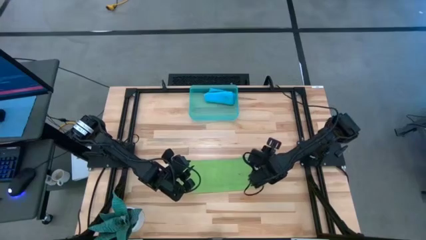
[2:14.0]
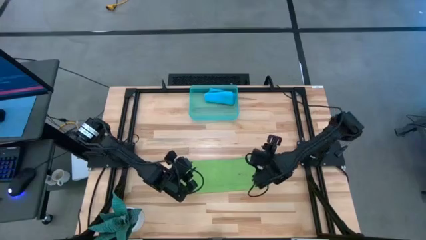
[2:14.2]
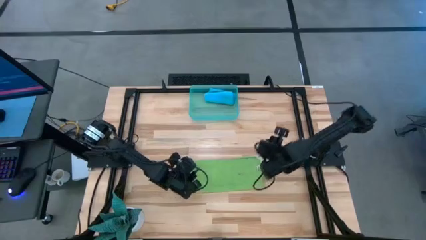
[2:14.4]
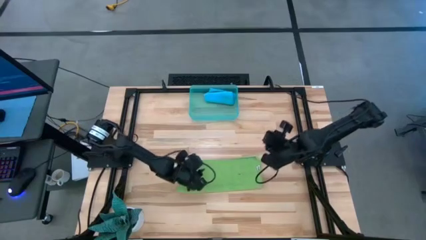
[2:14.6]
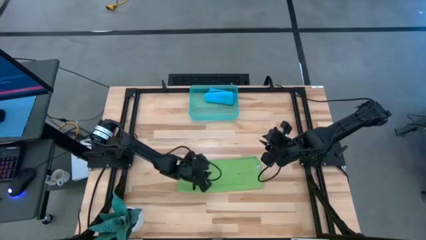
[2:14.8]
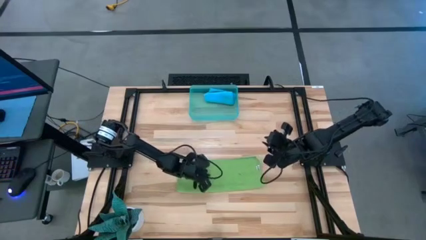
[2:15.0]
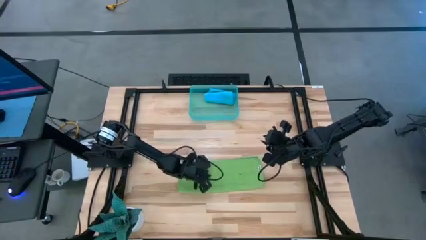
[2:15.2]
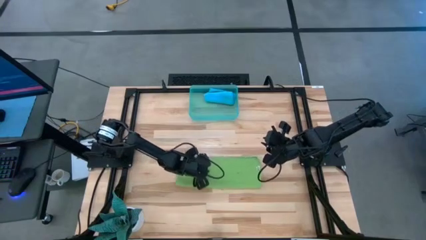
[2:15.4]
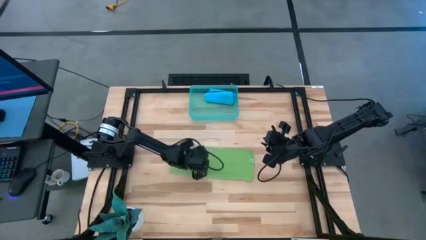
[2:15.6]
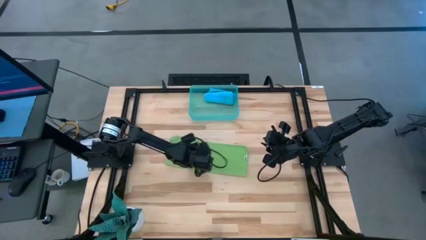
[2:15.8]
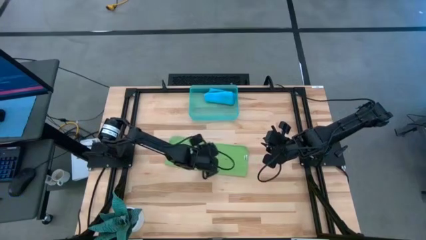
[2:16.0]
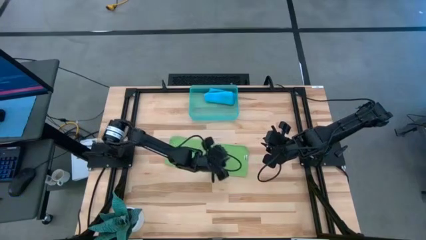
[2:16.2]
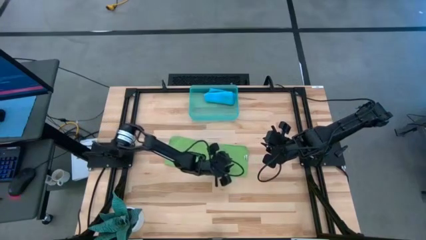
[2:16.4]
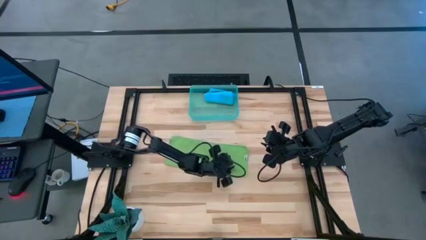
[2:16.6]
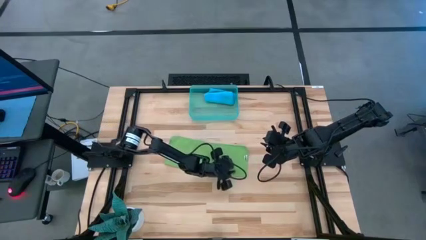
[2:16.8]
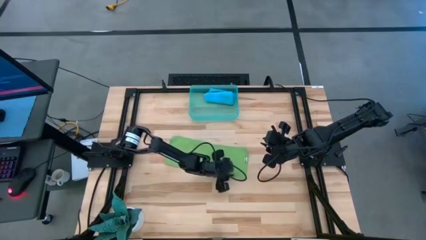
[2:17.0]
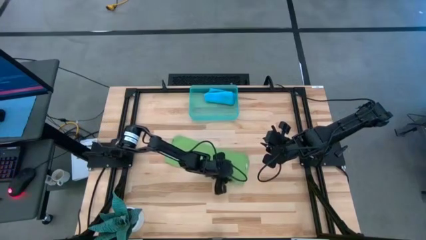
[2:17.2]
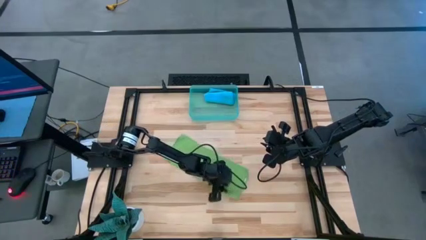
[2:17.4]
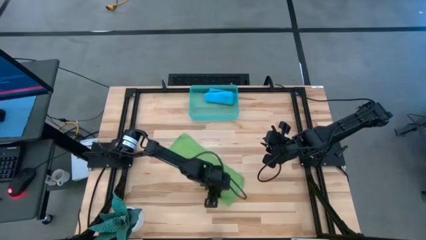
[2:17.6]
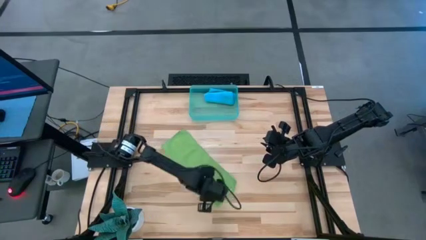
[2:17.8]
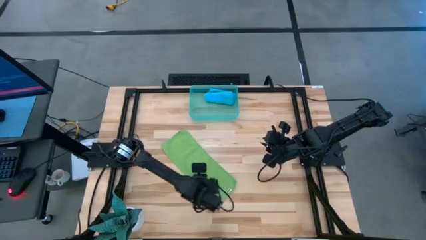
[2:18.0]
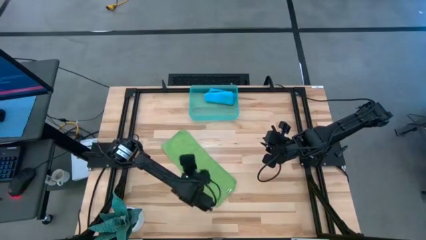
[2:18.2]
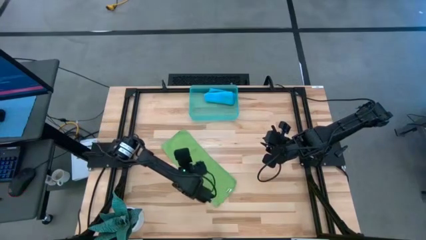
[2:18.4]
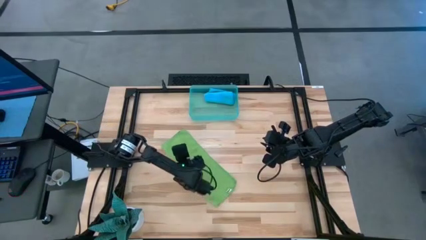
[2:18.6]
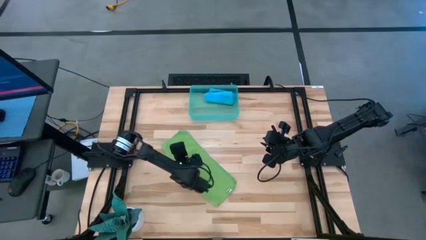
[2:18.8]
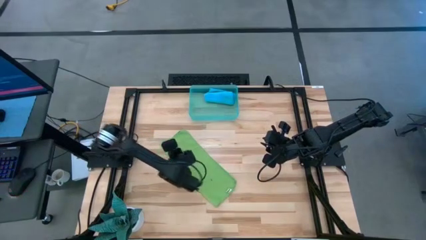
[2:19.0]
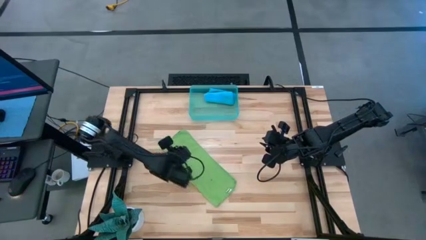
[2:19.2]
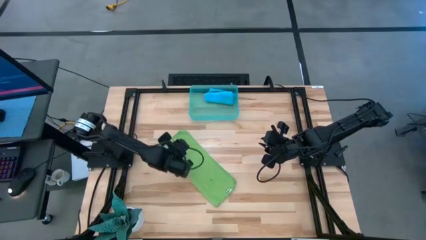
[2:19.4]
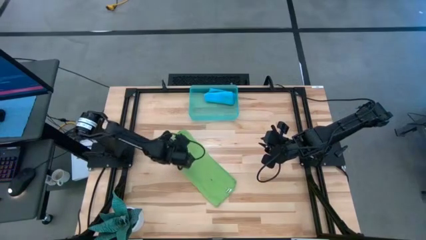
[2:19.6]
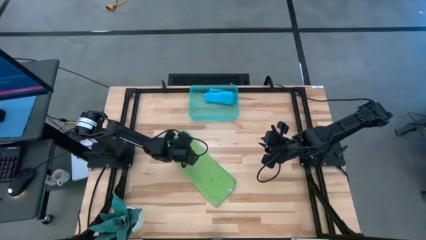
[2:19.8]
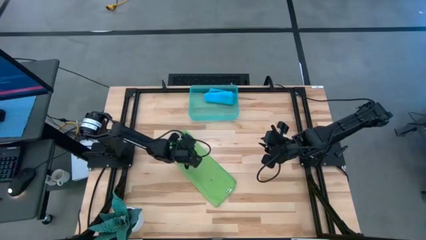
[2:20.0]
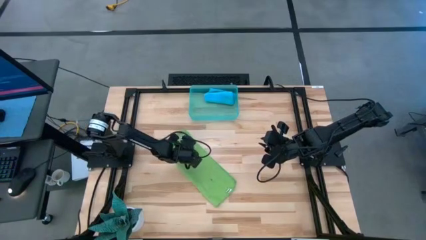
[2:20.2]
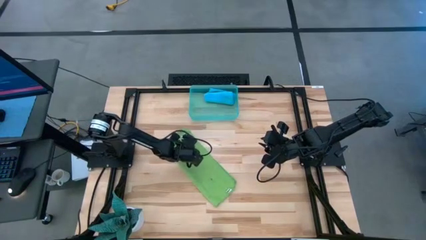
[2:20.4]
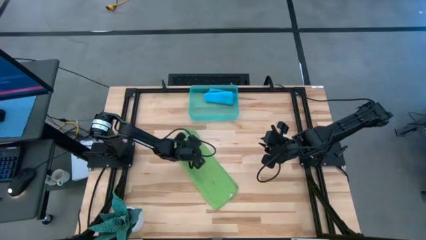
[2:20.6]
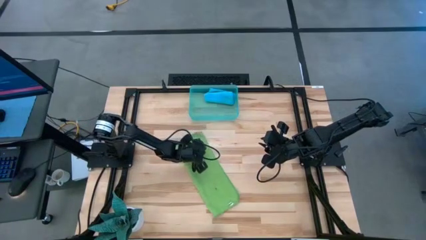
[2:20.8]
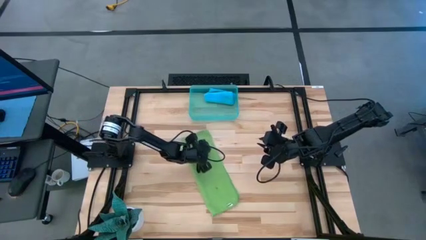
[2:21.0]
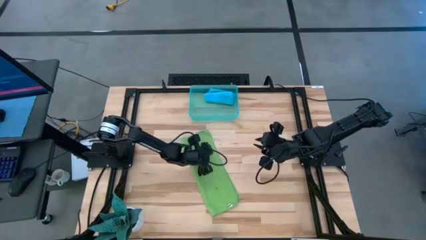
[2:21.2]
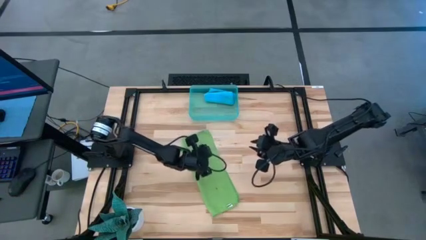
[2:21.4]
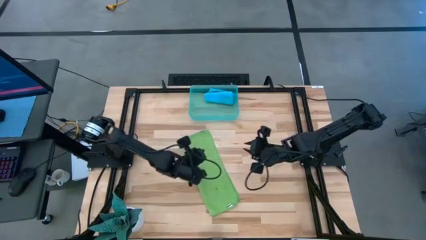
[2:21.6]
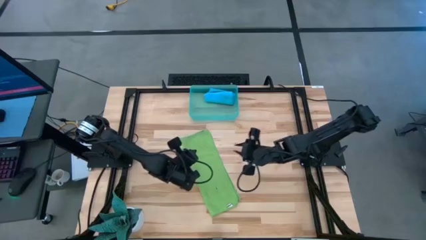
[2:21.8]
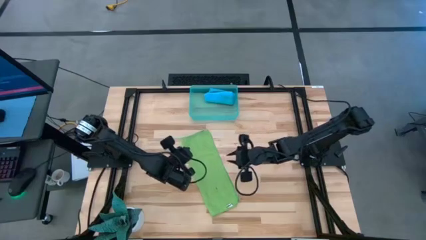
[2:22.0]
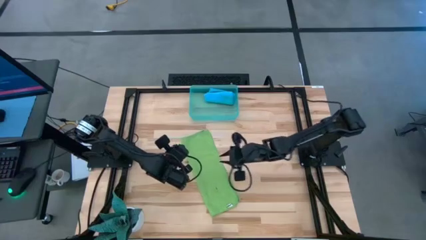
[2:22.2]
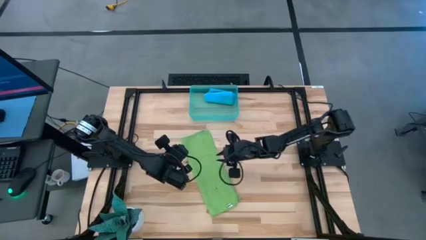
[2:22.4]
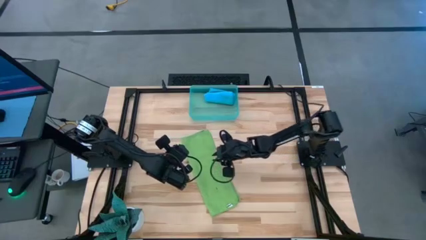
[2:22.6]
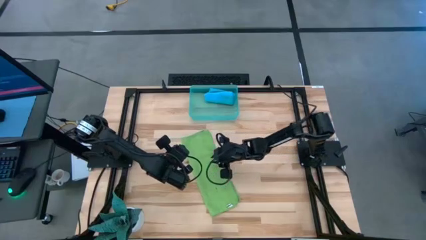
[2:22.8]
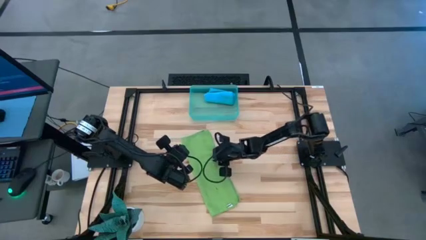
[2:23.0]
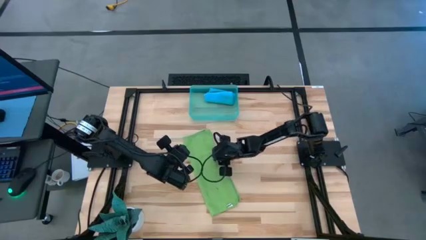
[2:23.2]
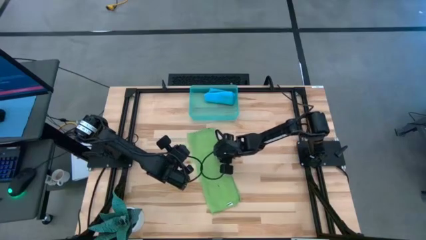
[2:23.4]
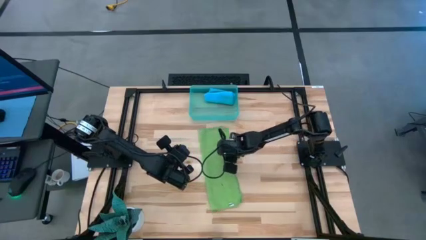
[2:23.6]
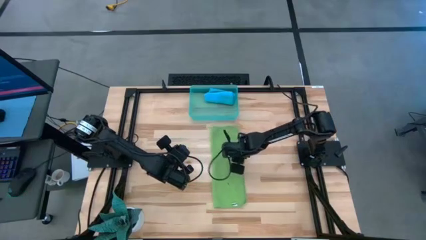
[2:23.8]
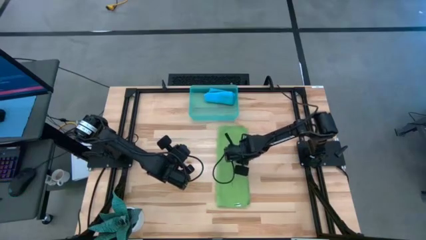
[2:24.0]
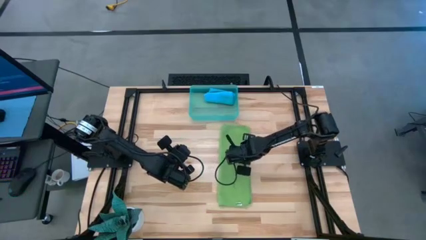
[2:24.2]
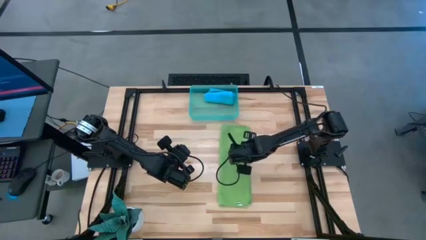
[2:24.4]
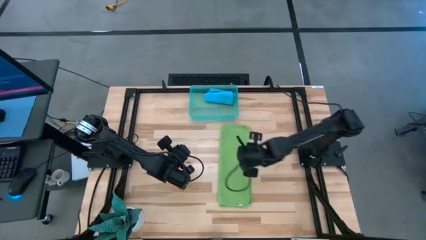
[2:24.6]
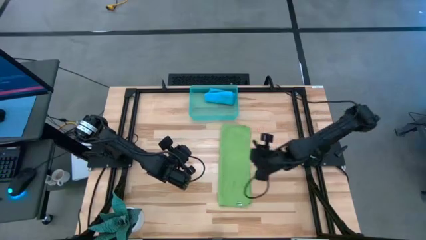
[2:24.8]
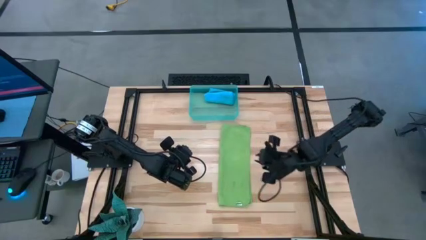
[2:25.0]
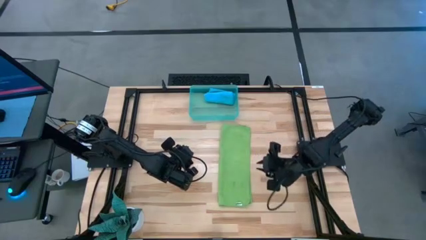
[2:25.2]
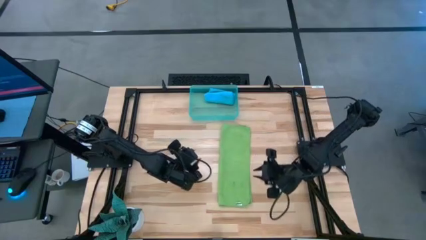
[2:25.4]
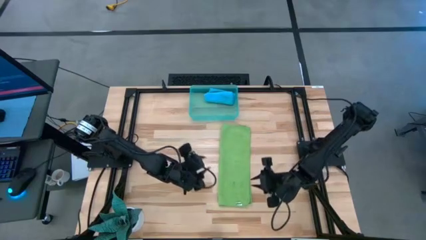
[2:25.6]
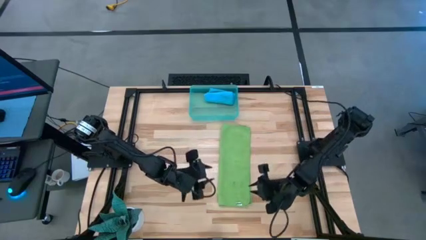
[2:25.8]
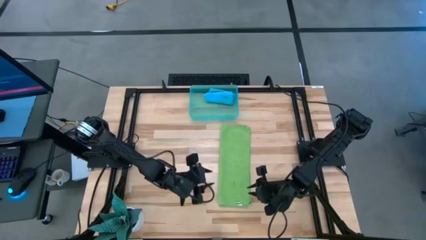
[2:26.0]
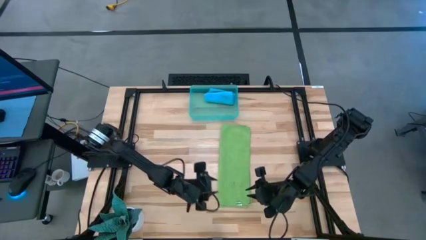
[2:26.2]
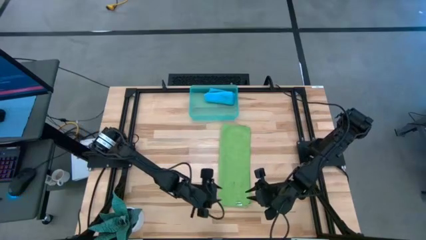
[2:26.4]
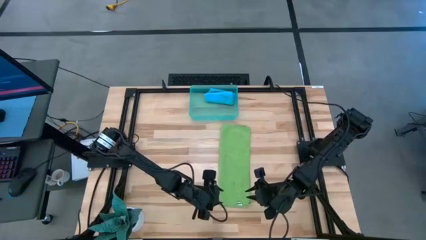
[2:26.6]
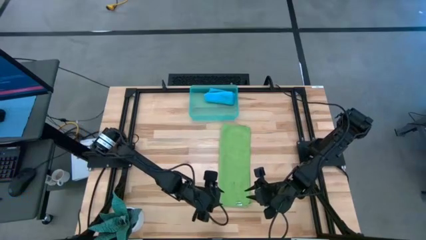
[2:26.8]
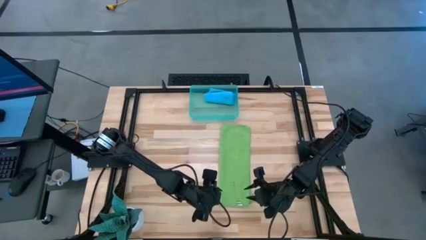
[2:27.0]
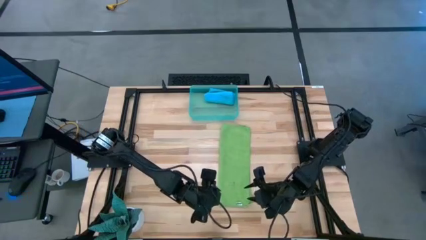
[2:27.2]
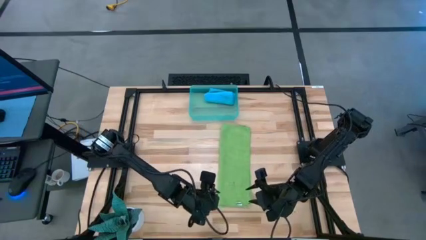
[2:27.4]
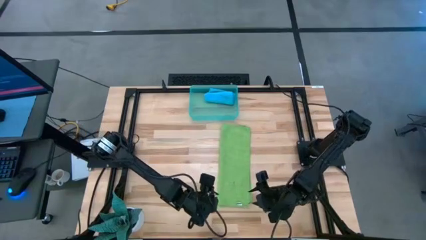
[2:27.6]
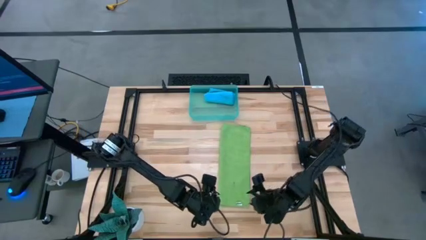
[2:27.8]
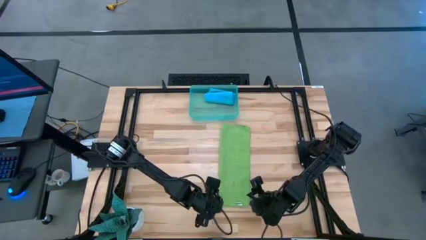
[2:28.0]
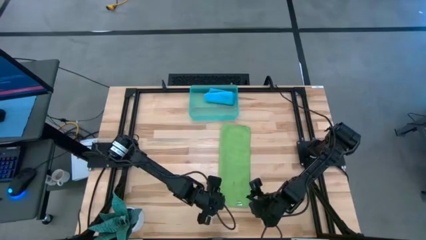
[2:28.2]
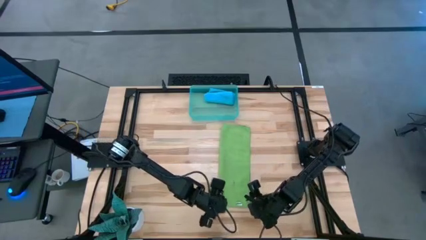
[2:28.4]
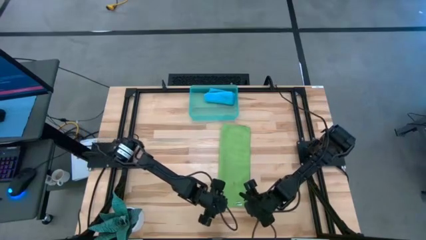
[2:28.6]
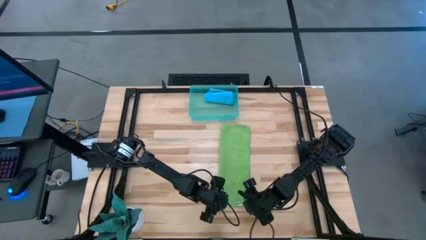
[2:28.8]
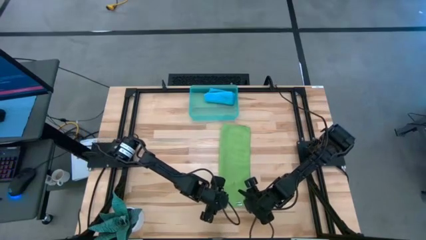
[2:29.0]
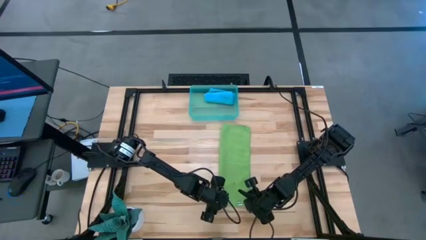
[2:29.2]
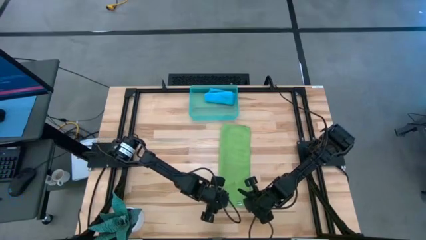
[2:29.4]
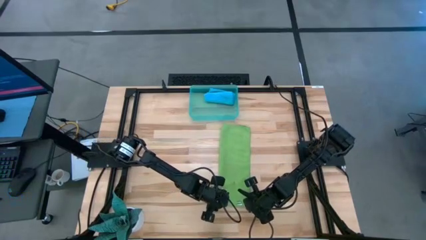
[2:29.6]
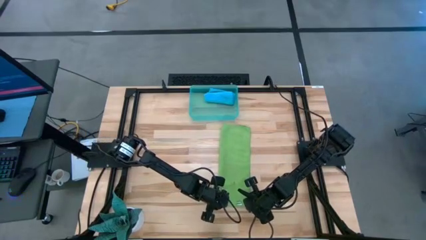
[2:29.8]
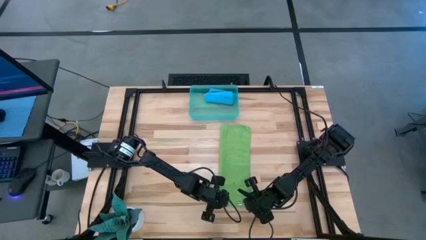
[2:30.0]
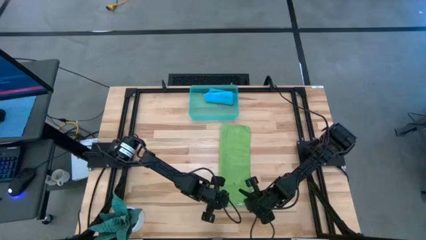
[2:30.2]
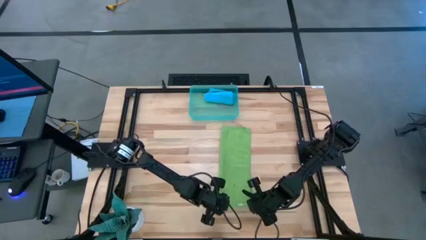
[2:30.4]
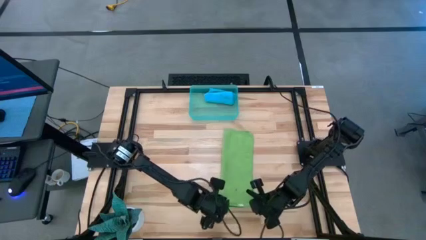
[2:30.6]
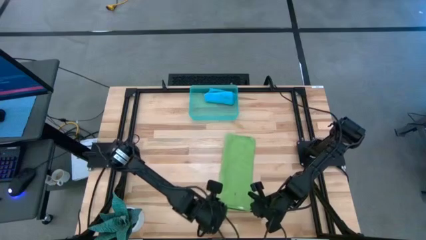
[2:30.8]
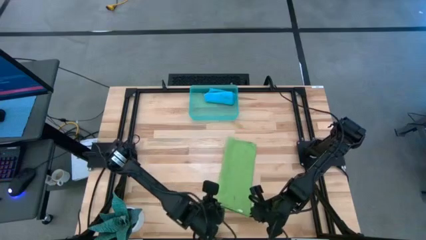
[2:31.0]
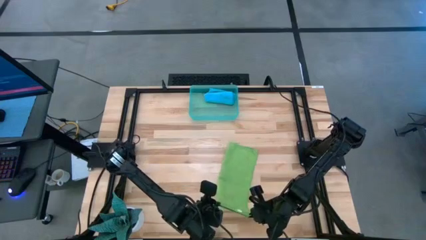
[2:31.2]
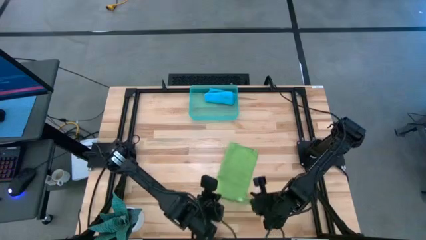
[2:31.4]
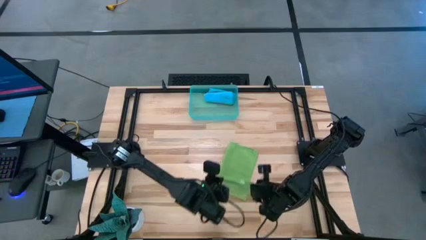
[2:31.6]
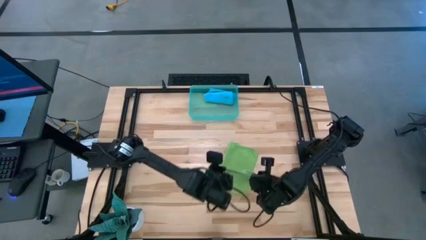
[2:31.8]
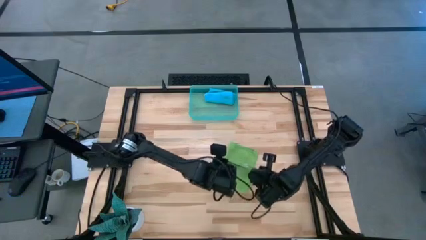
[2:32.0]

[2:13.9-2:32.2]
Task: Roll microfiber towels into tight, uniform cylinder then place into a basket
Roll the green microfiber cloth
